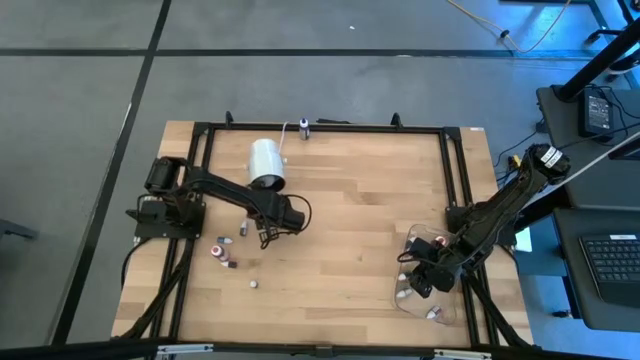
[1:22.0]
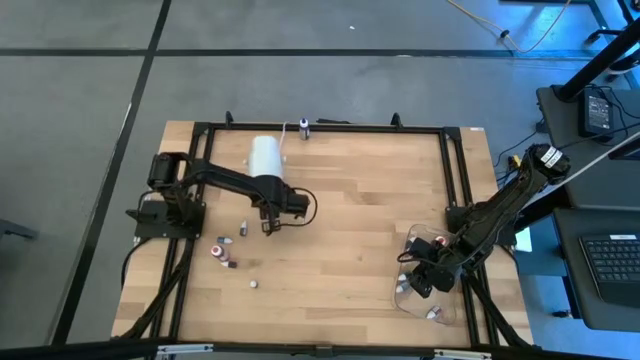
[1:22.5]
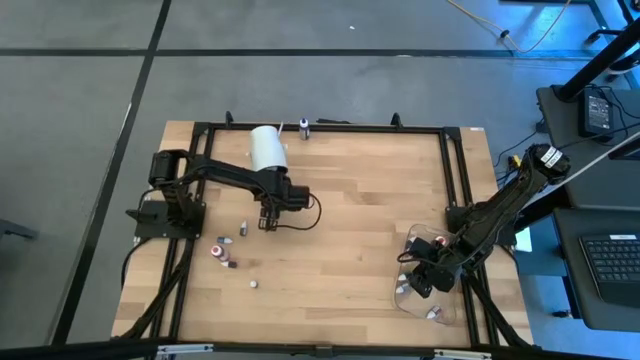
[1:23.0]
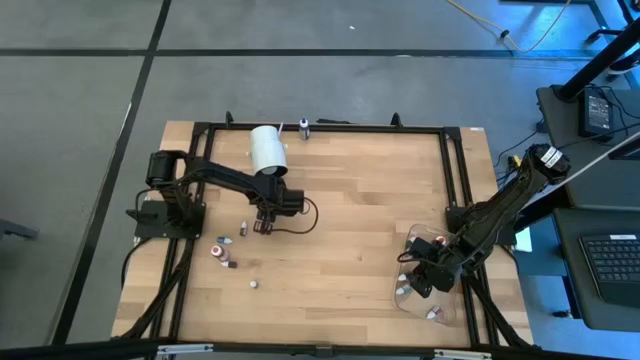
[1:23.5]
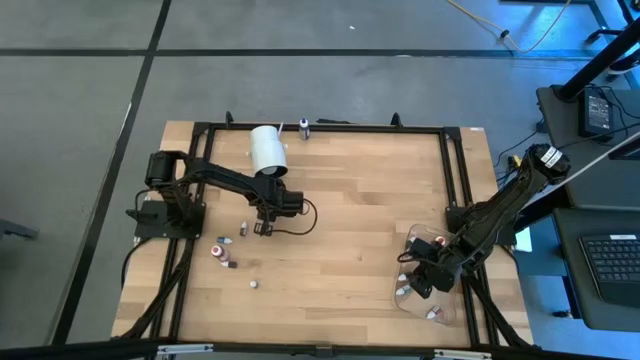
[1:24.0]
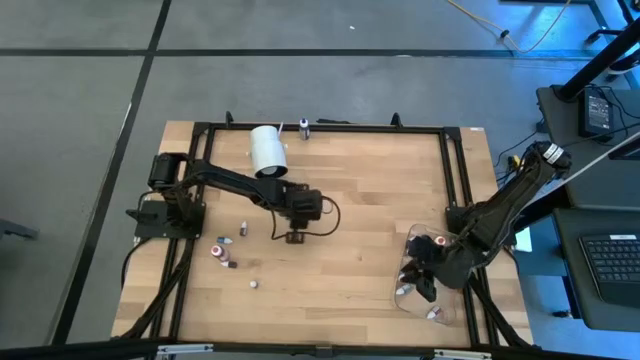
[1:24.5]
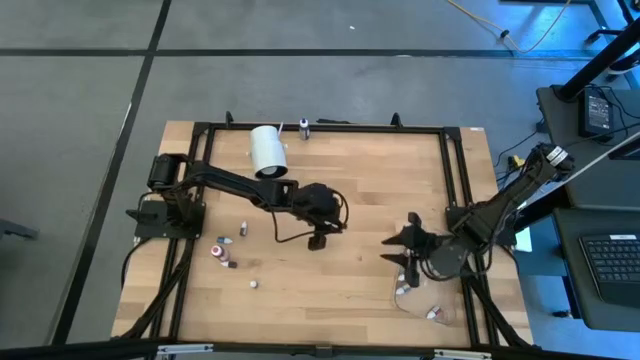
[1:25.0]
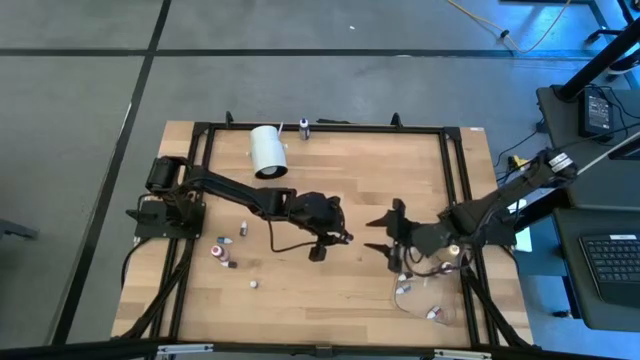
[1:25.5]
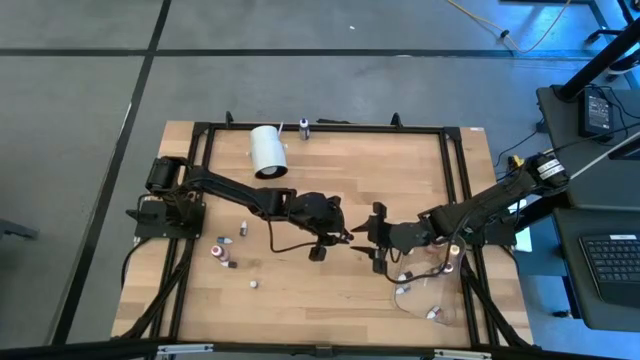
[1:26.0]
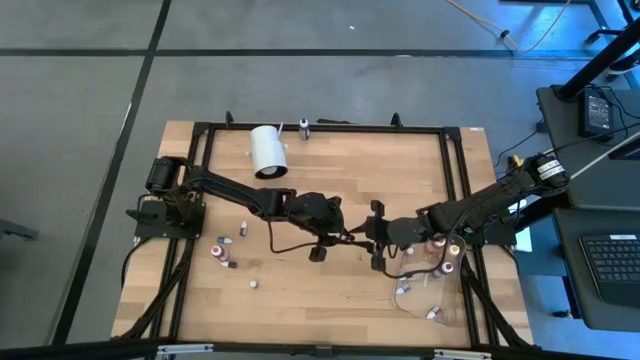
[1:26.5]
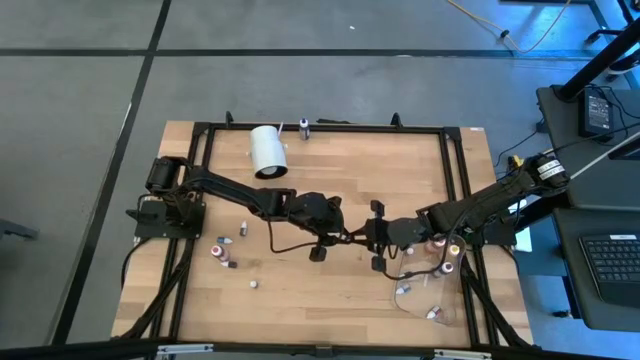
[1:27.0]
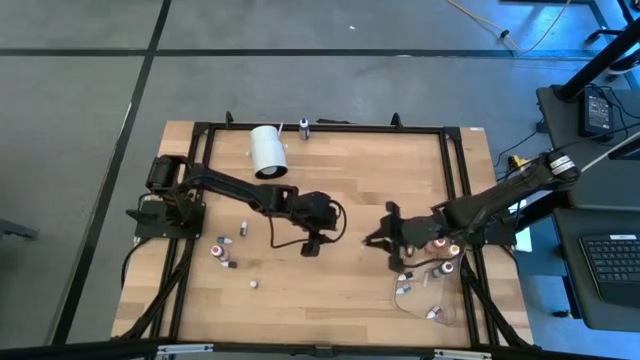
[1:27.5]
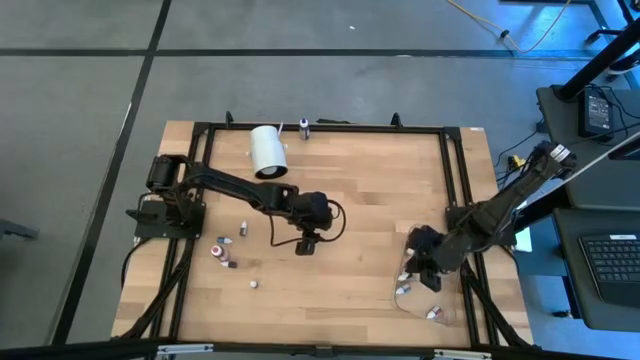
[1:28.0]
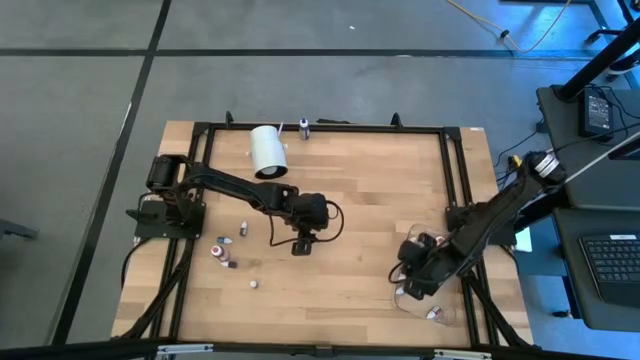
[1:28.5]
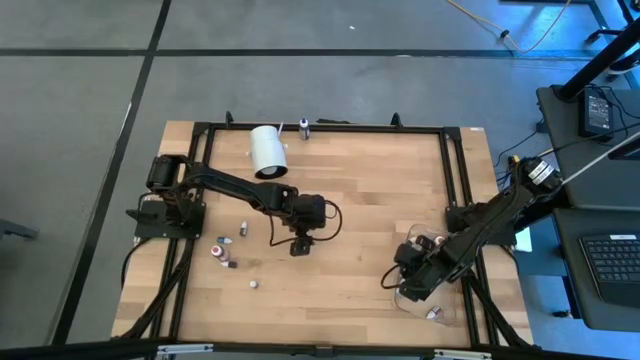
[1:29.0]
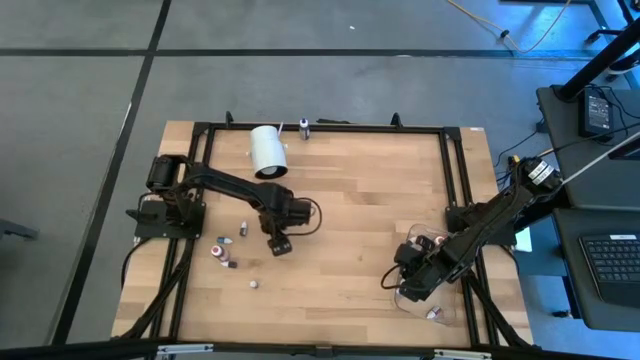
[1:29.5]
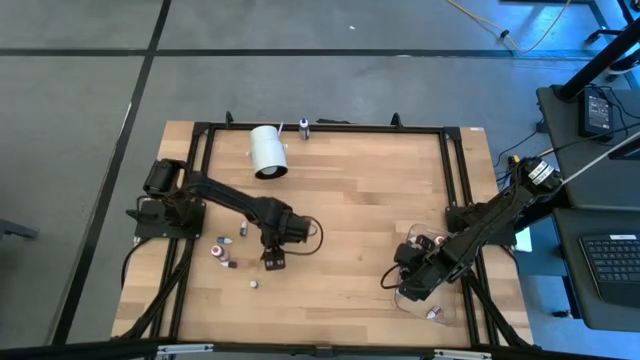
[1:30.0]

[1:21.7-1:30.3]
Task: Pick & Place food coloring
Put the top small pink food coloring bottle into the transparent bin

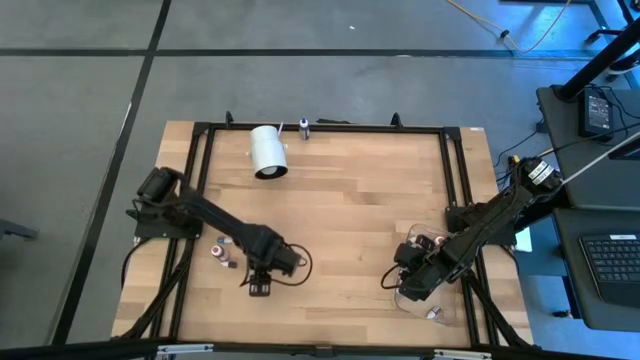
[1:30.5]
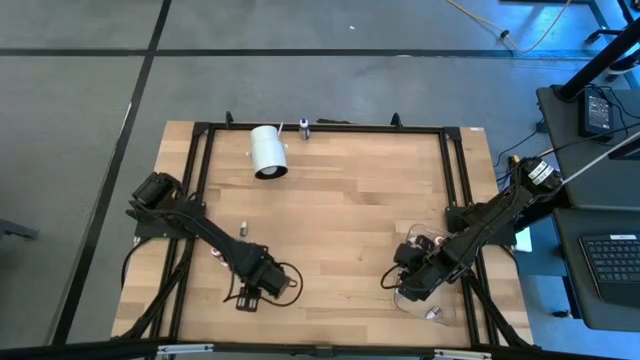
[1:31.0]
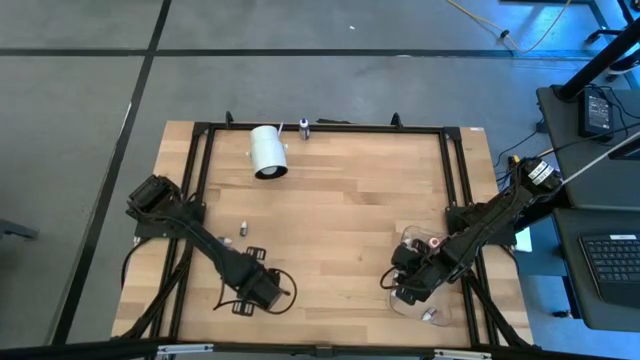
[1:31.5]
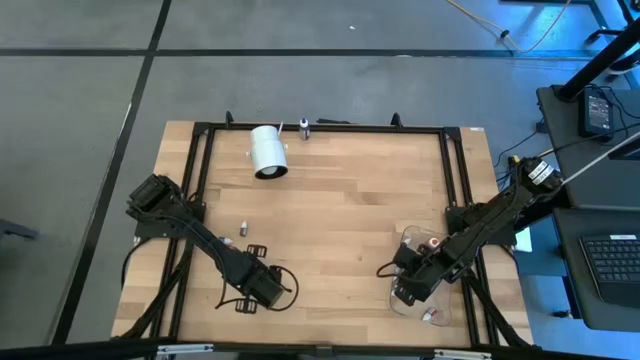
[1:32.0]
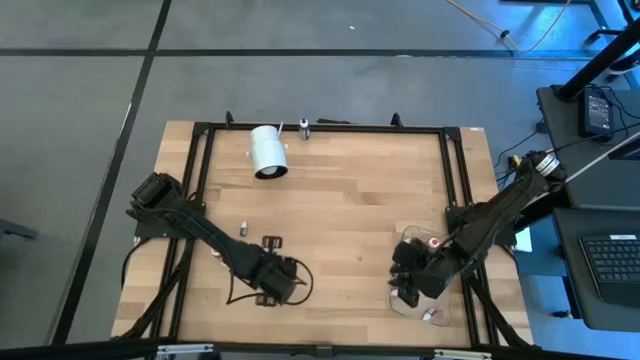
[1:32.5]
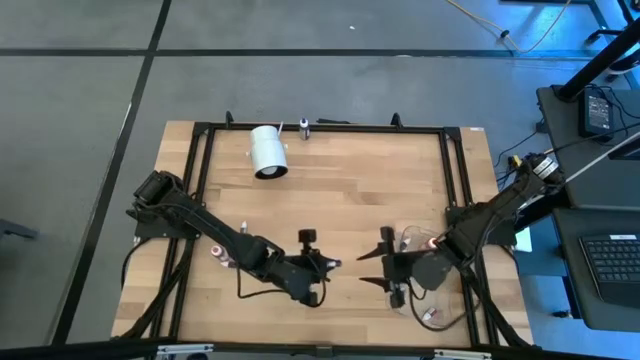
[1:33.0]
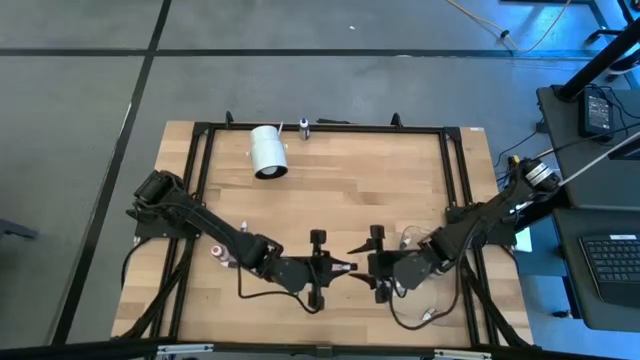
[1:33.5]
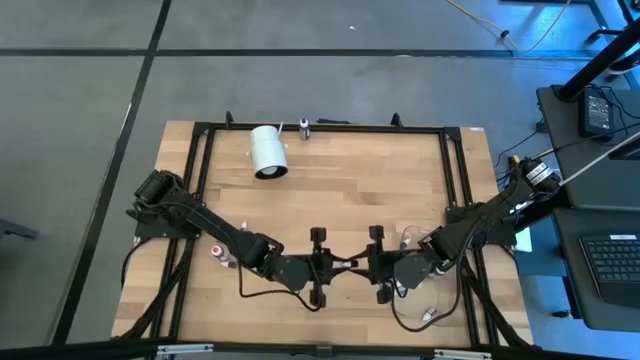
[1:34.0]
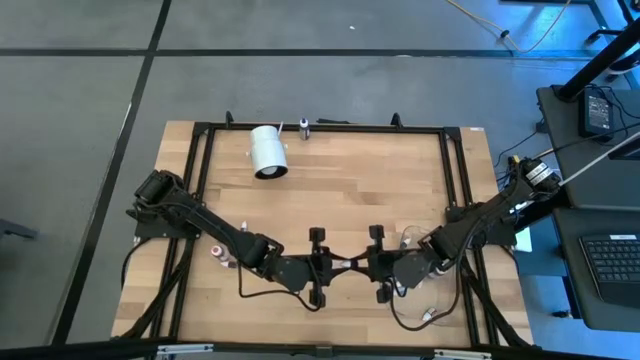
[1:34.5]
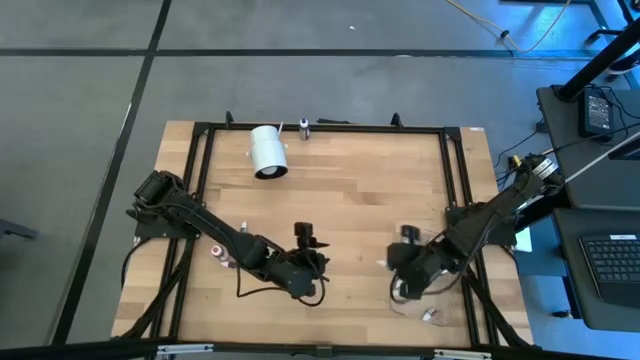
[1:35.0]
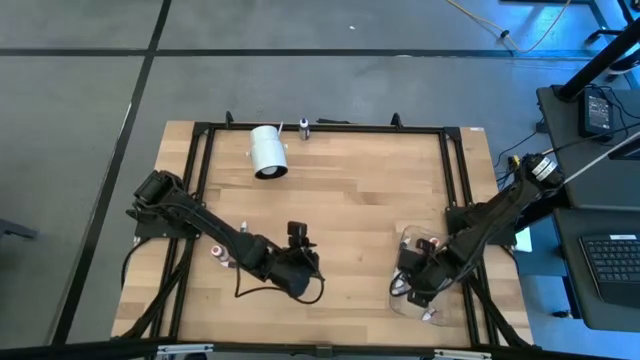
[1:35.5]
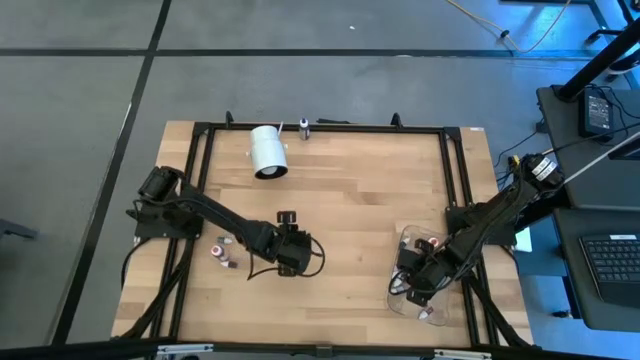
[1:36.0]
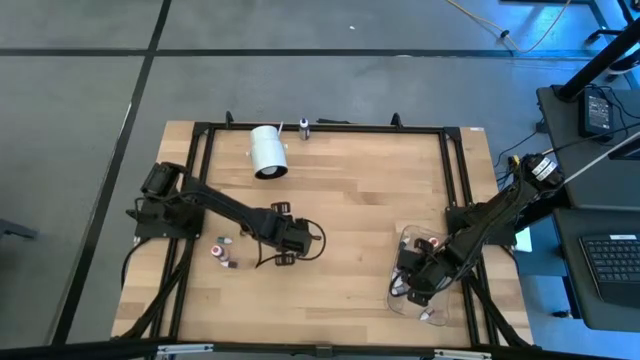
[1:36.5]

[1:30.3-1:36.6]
Put the small purple food coloring bottle into the transparent bin

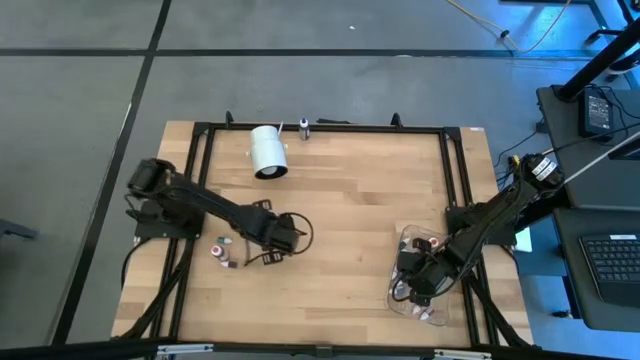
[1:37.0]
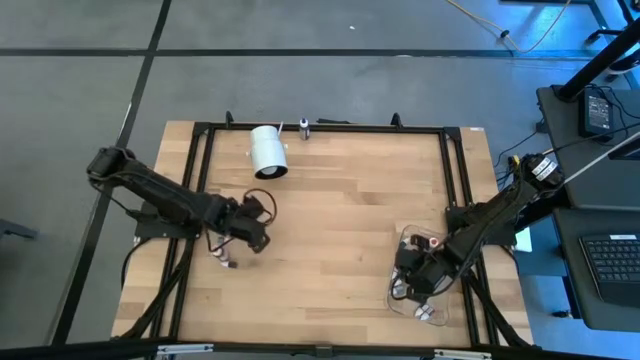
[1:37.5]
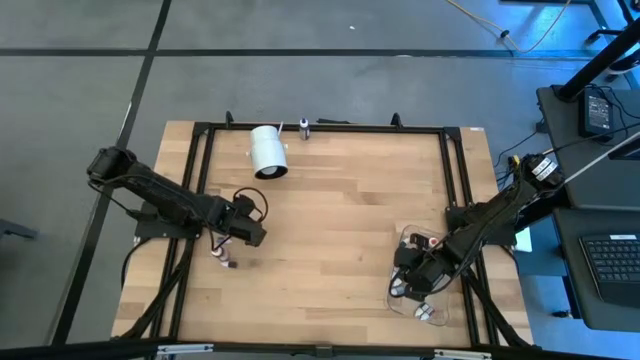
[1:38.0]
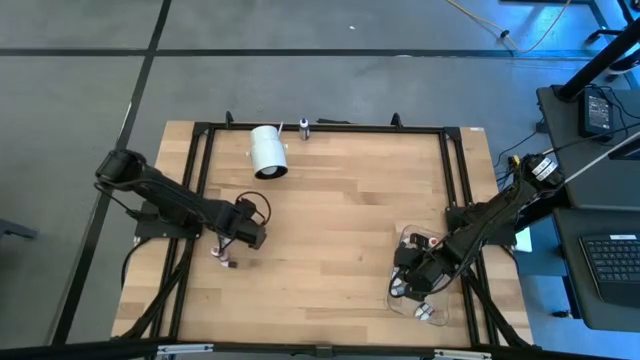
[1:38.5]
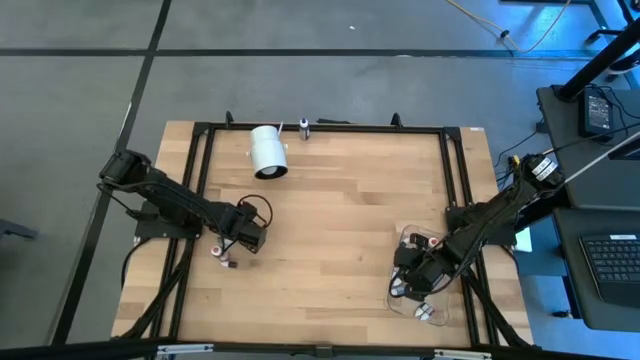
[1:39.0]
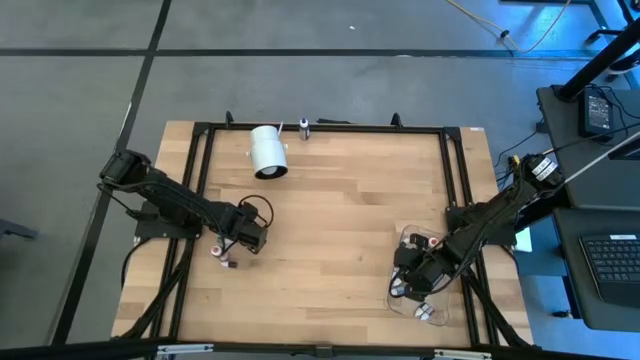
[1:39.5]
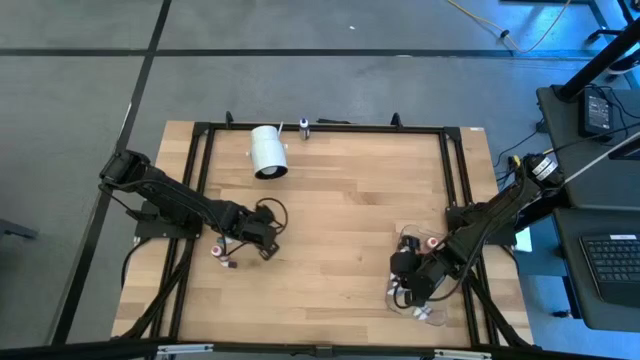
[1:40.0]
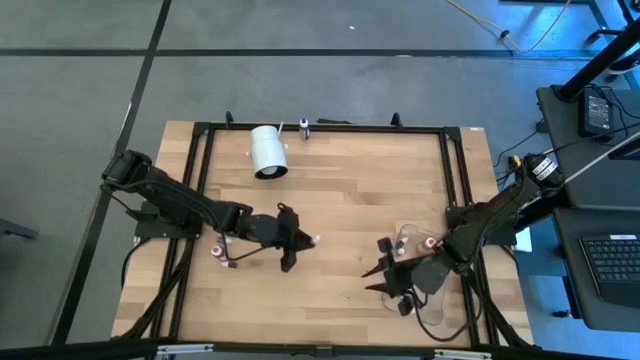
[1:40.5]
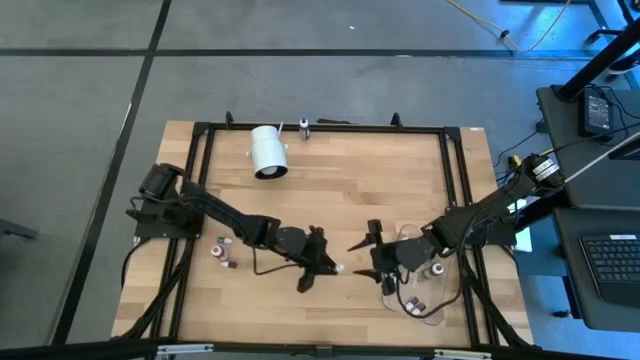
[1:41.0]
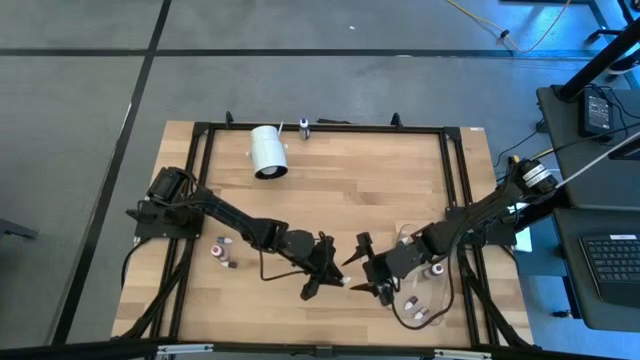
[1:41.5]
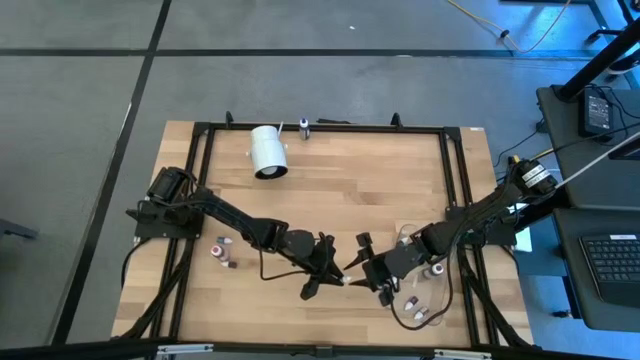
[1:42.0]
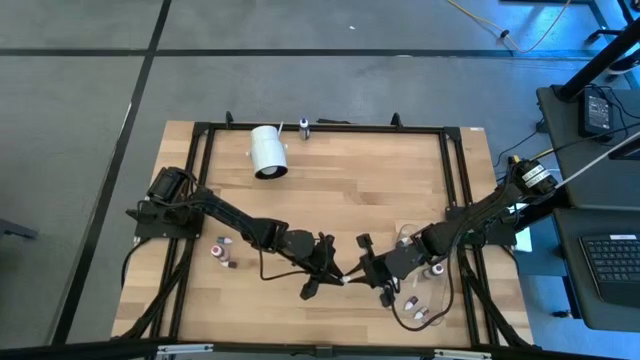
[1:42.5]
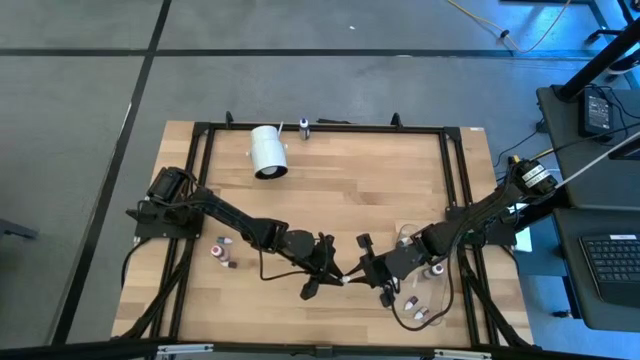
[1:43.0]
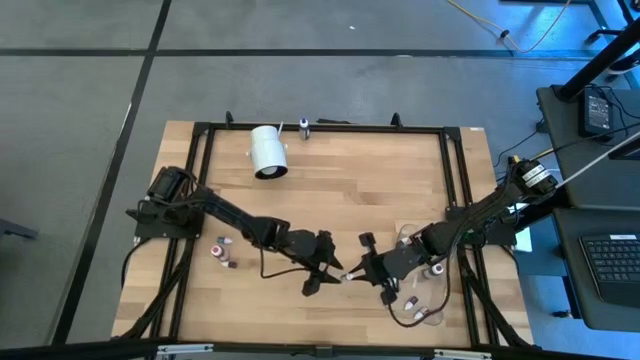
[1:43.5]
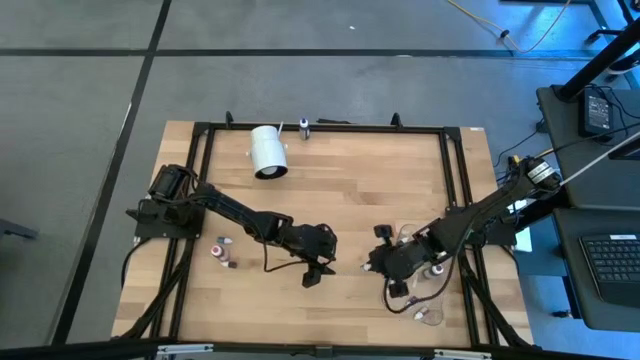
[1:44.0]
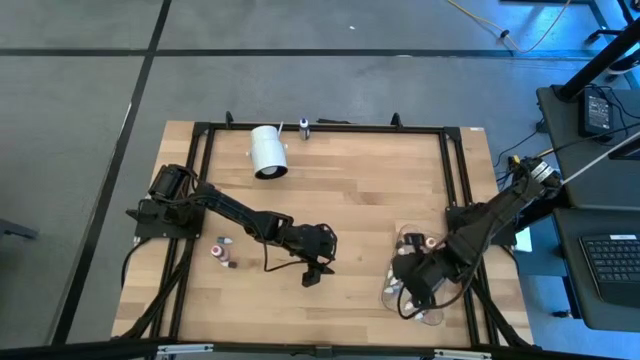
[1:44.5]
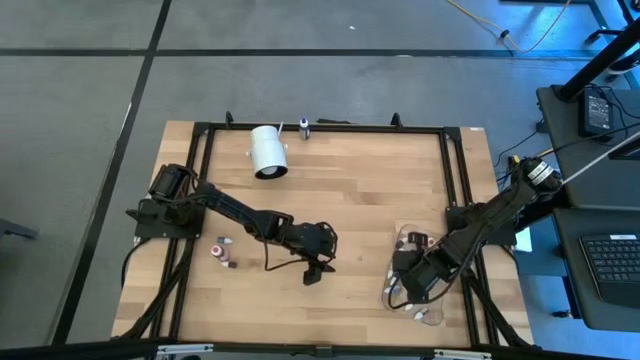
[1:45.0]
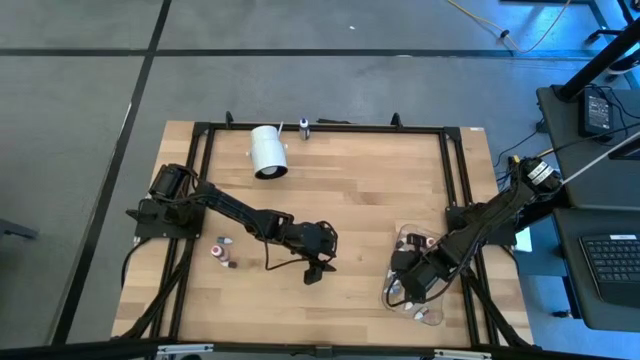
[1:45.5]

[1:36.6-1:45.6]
Put the small brown food coloring bottle into the transparent bin
